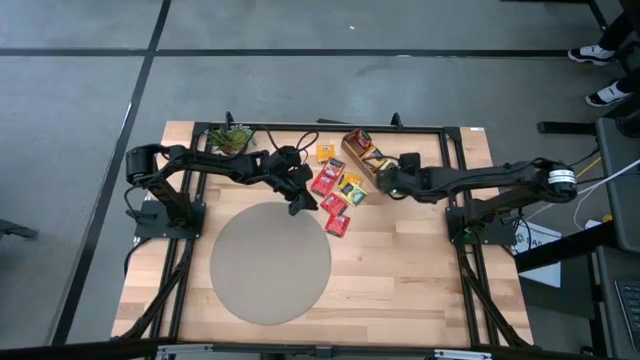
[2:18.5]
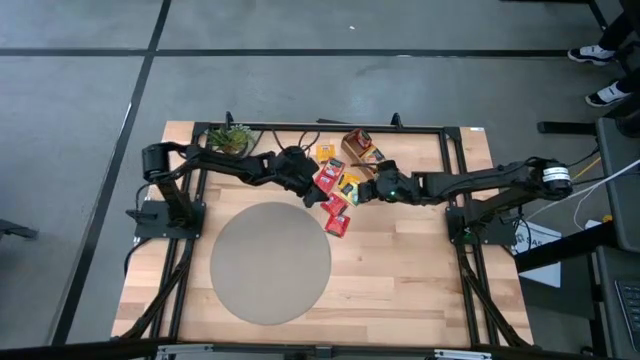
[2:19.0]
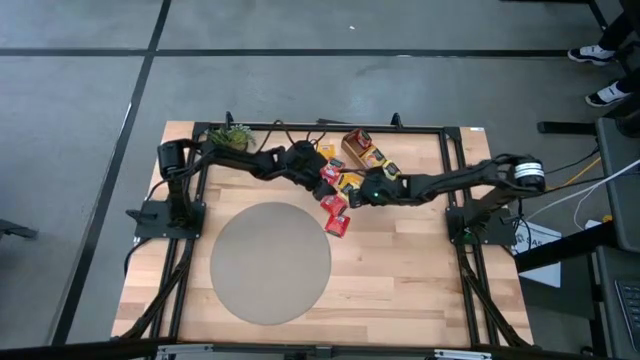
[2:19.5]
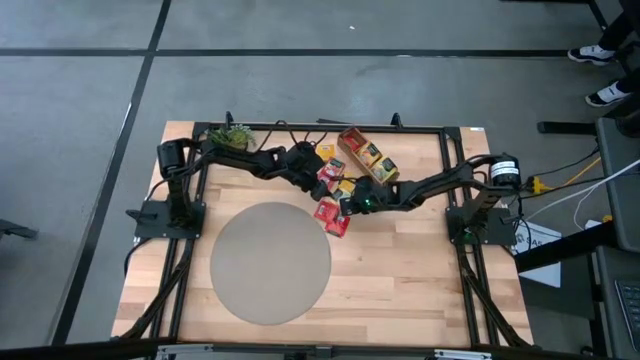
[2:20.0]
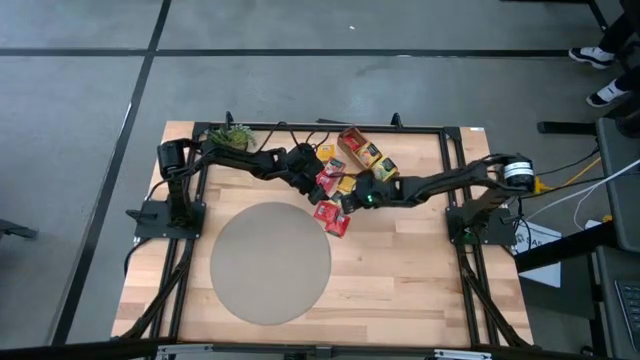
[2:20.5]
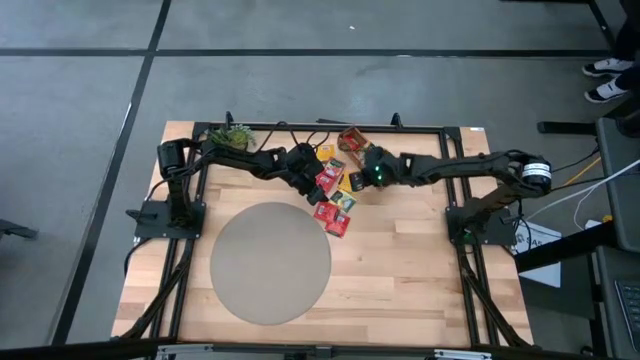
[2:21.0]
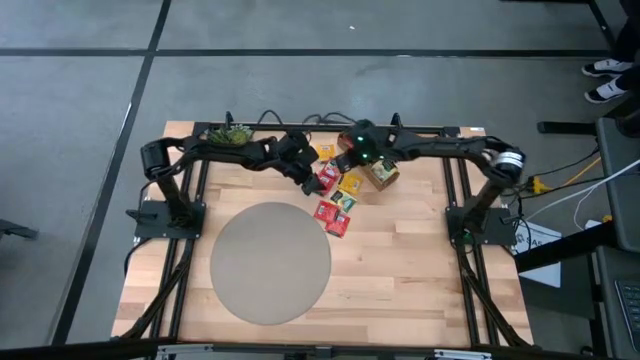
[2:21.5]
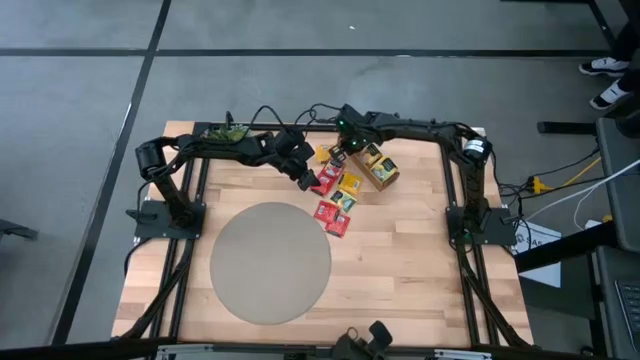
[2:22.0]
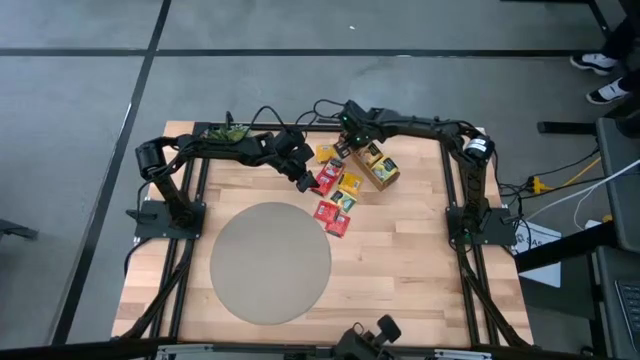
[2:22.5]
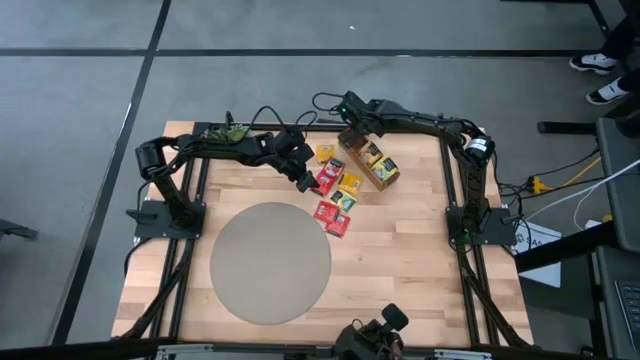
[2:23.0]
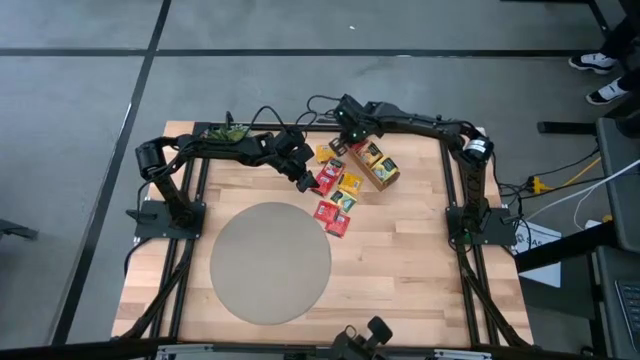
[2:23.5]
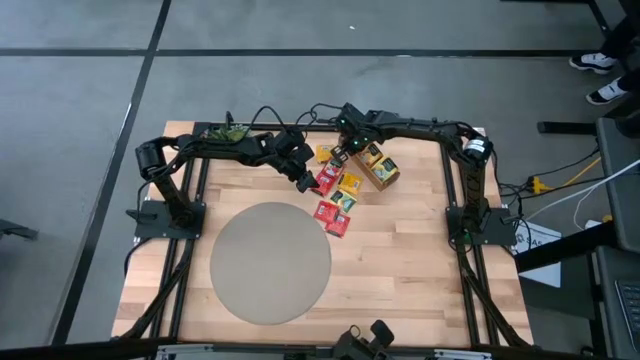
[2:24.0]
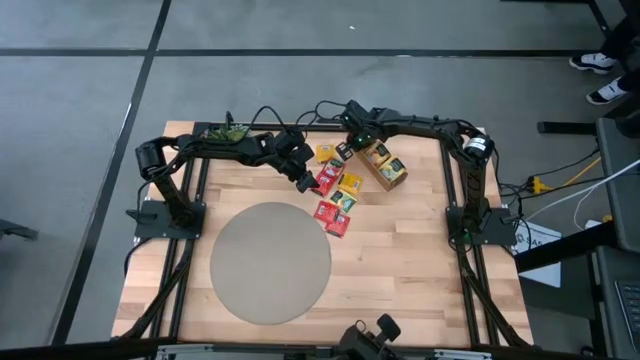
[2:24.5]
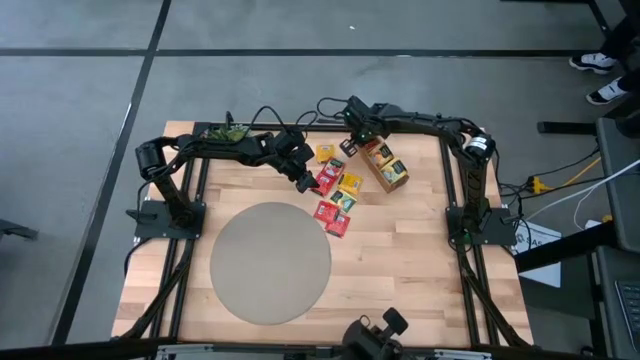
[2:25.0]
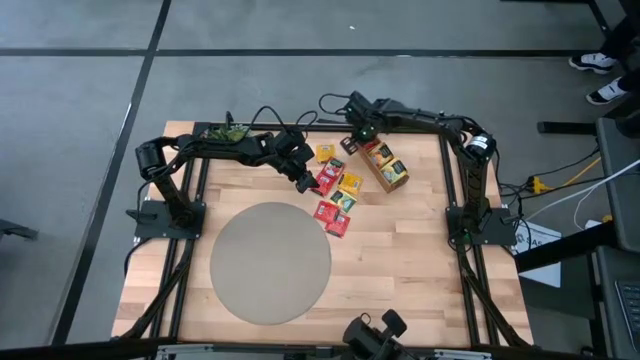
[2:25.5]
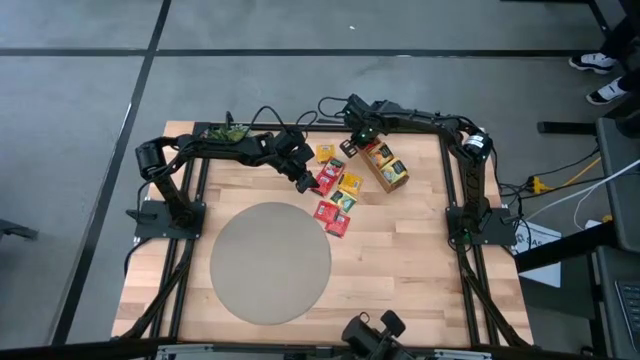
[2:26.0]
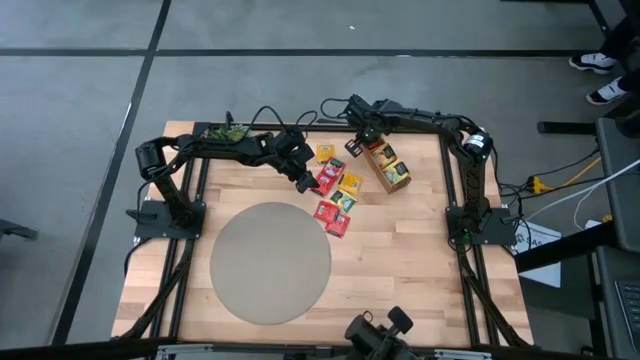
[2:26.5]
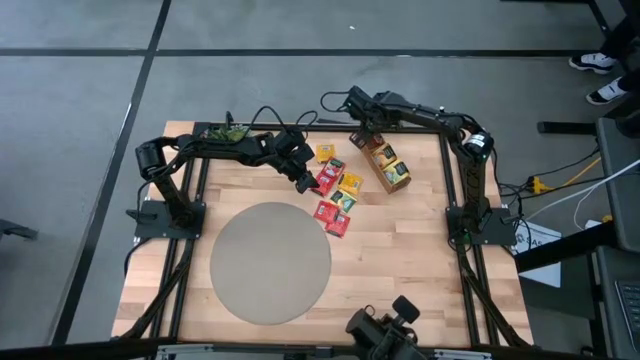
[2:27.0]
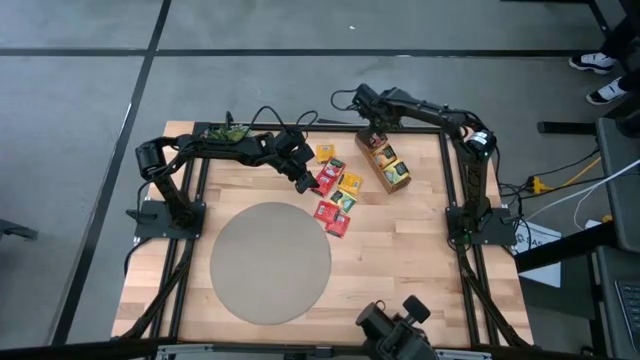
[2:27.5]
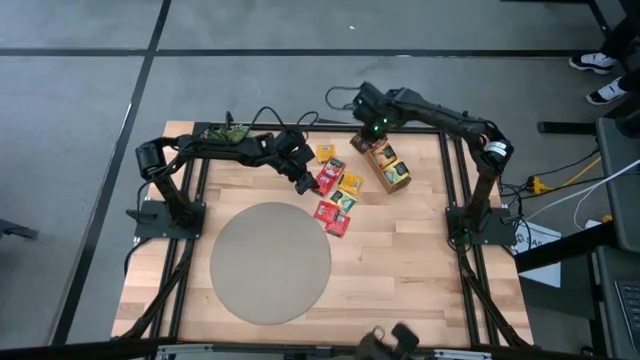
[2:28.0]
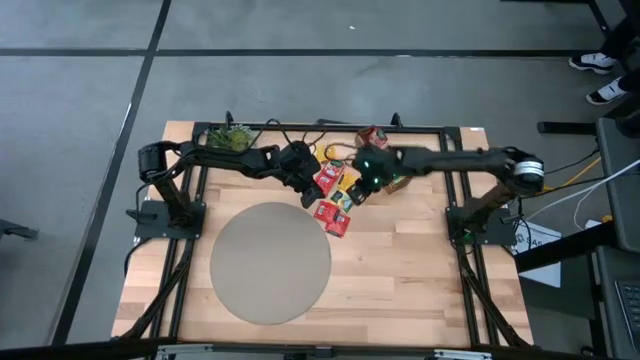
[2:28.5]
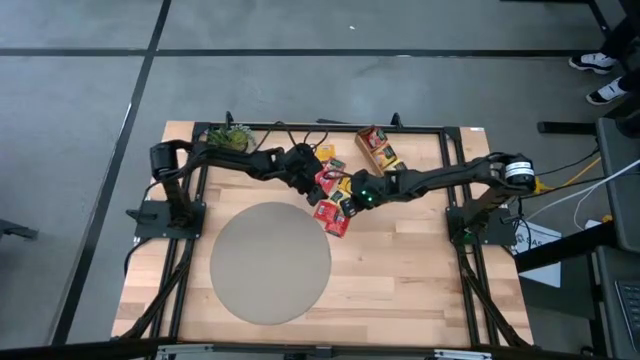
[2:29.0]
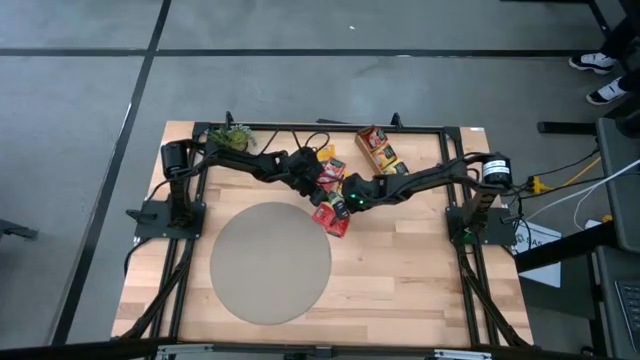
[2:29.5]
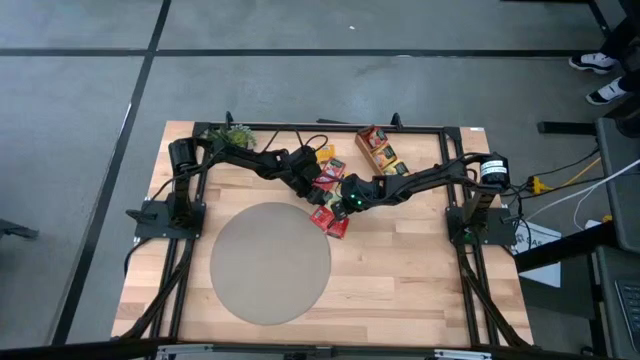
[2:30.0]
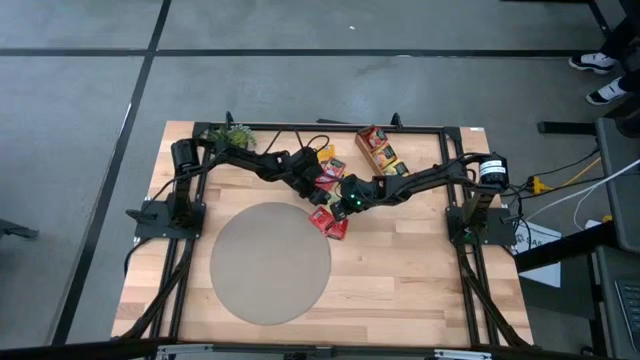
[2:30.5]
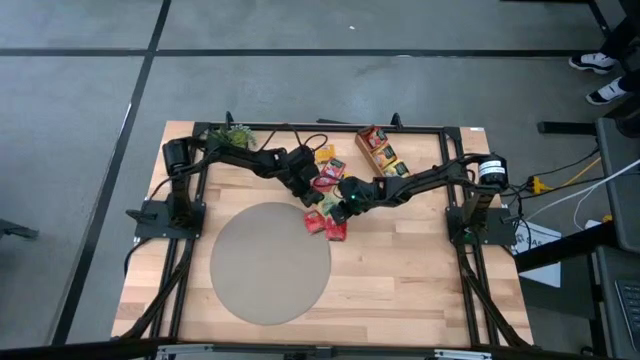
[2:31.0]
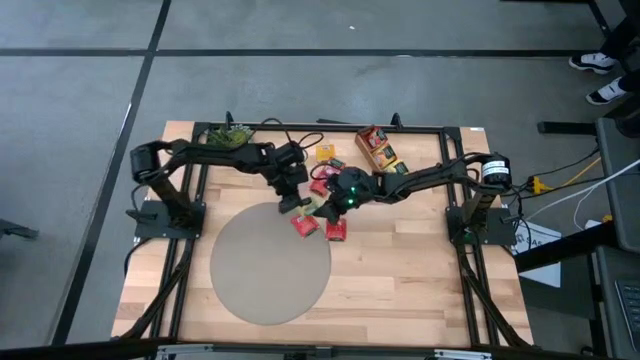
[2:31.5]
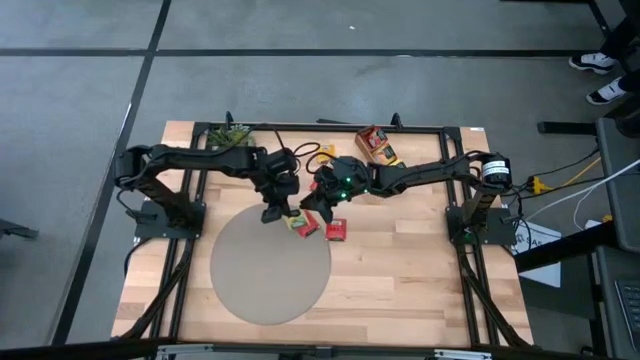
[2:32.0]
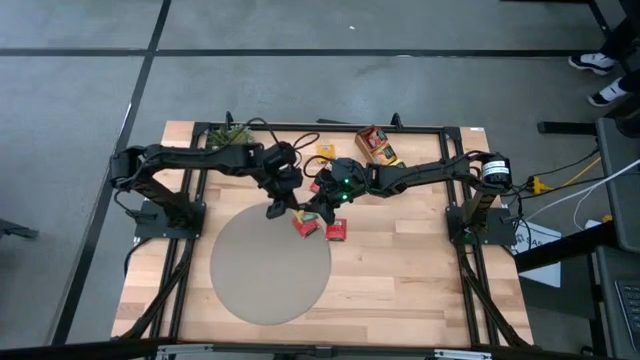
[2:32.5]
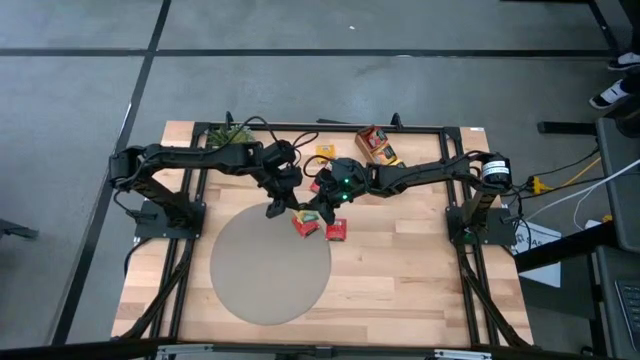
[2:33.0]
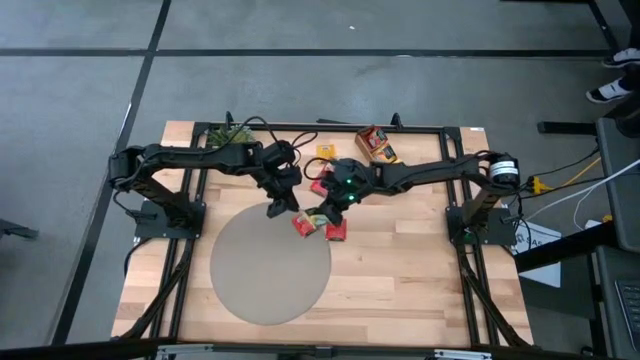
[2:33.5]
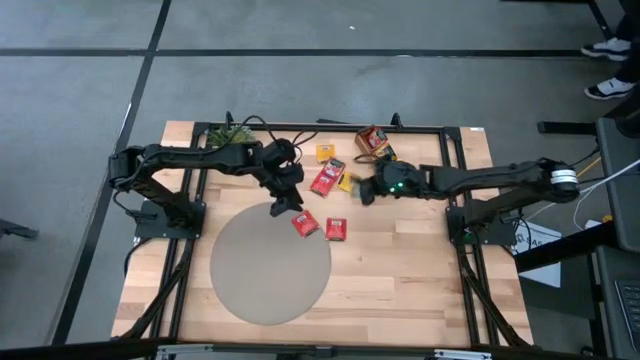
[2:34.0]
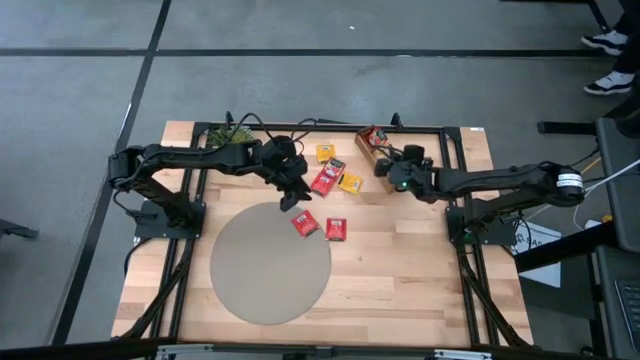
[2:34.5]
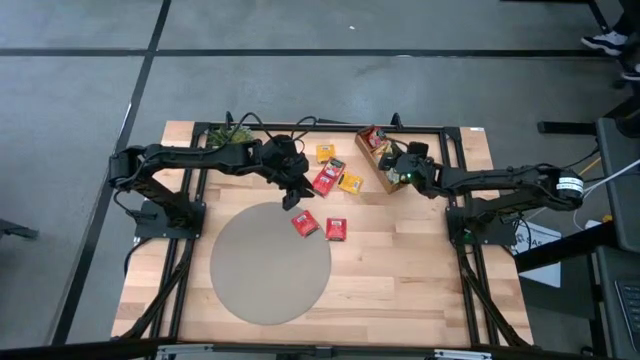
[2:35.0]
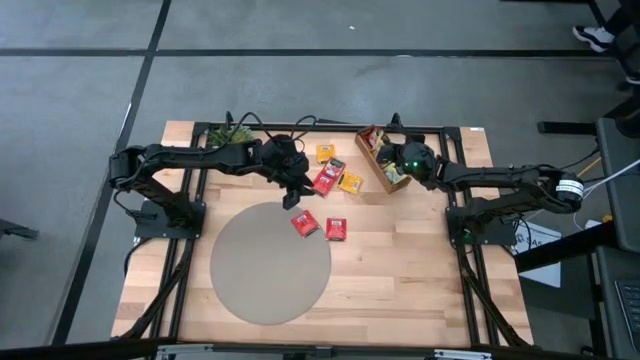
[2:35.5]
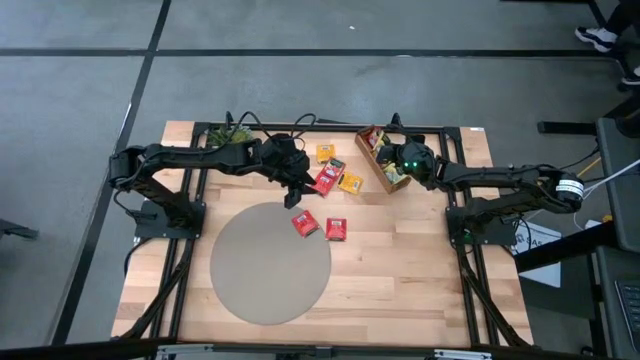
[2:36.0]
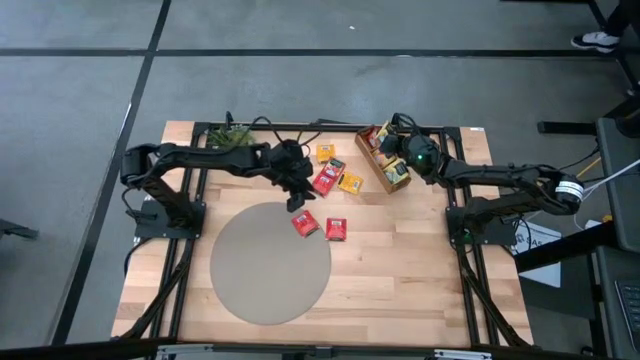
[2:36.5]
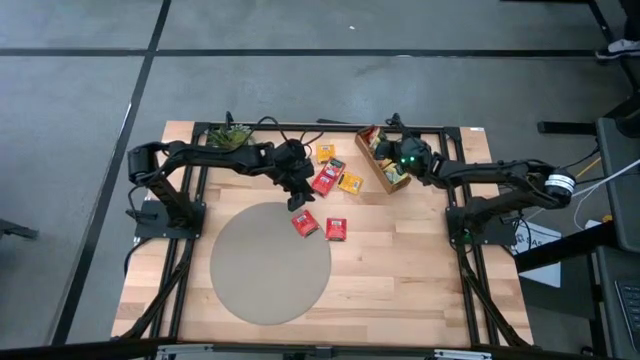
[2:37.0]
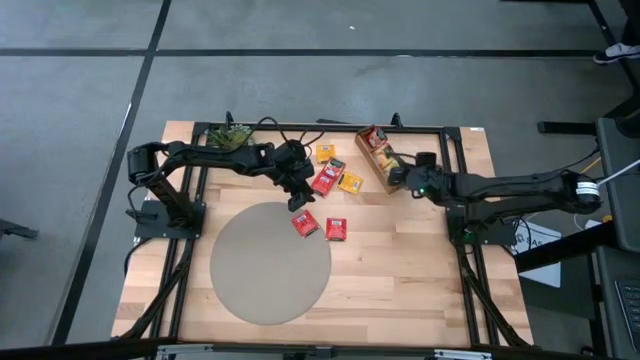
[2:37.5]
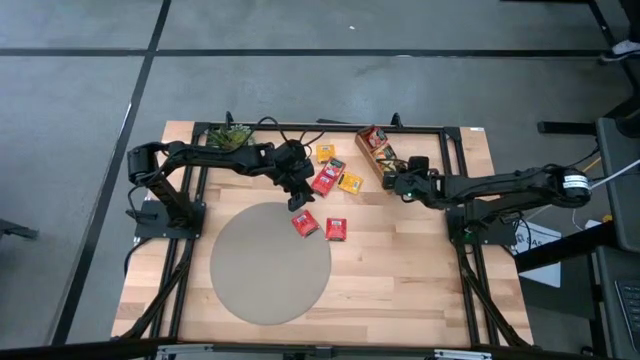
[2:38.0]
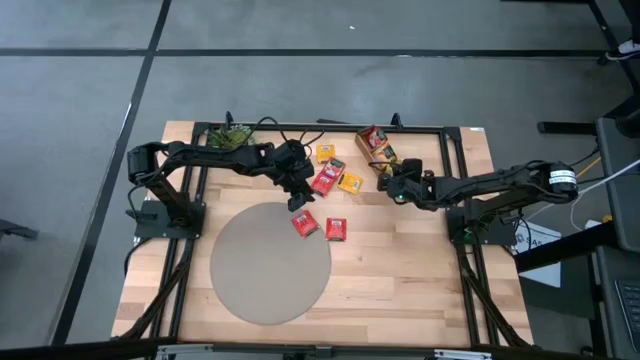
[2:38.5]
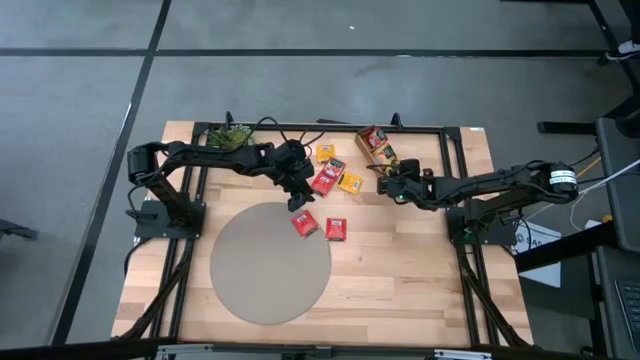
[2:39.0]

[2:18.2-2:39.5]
Task: Pick & Place Tea
Put the yellow tea bag into the bottom section of the wooden organizer

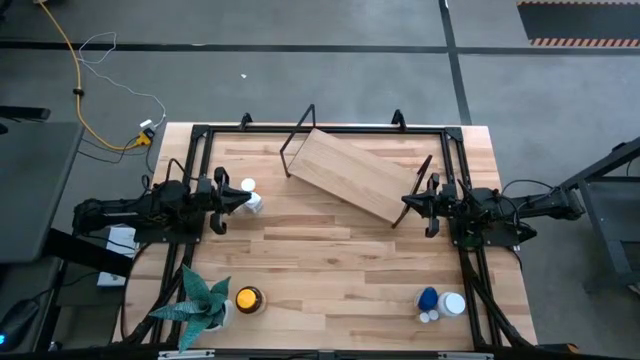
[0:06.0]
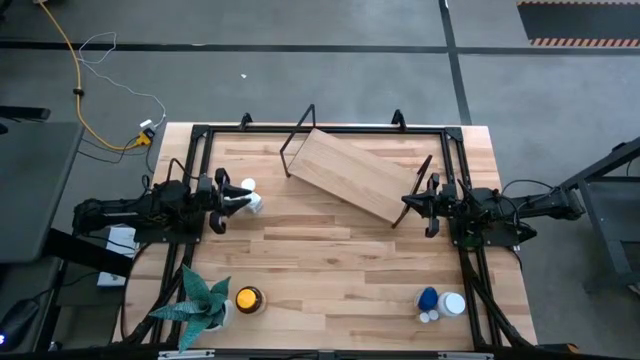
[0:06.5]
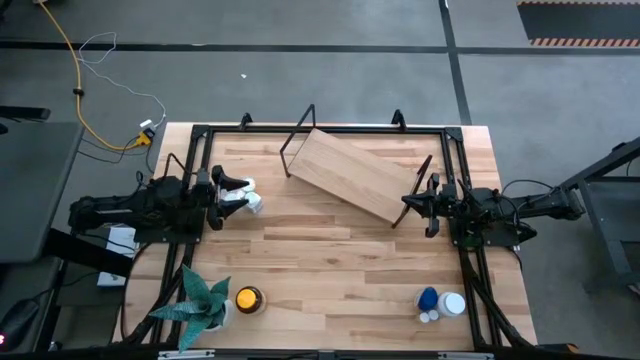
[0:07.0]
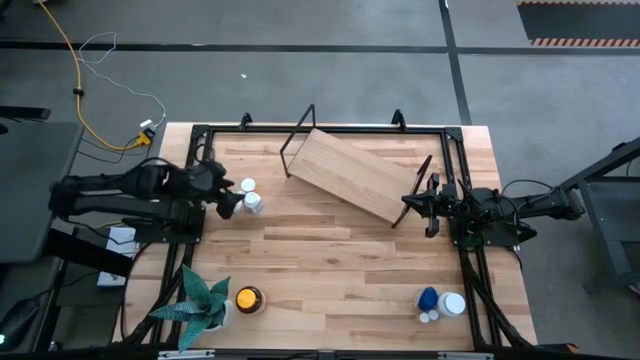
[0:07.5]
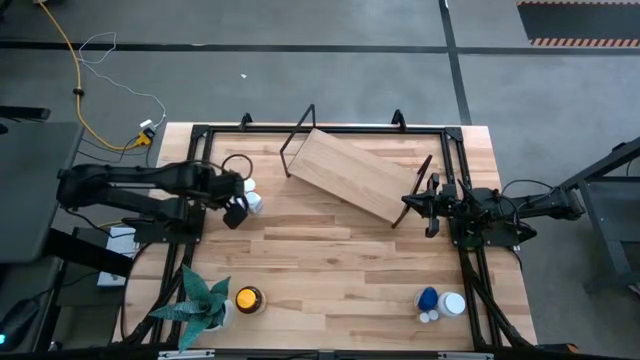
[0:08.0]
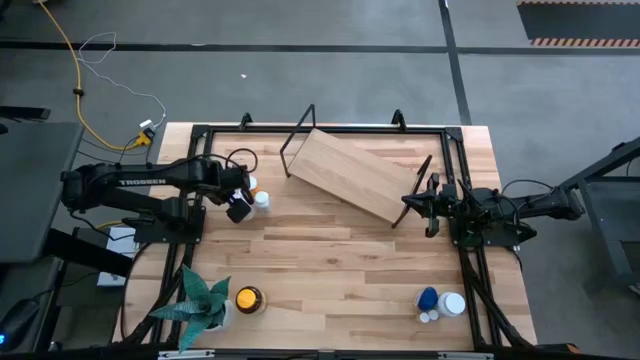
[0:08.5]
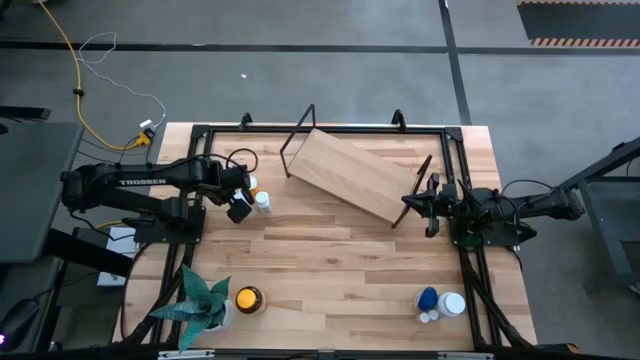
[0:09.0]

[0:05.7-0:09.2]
Task: Pick and place medicine bottles onto shelf by color
Put the top left white pill bottle on the shelf
